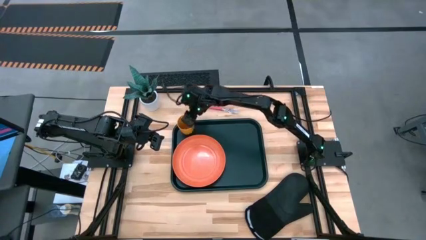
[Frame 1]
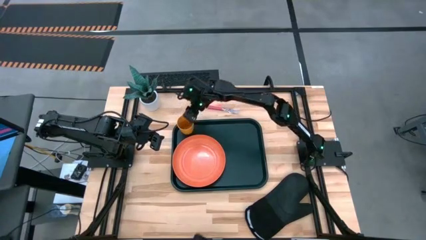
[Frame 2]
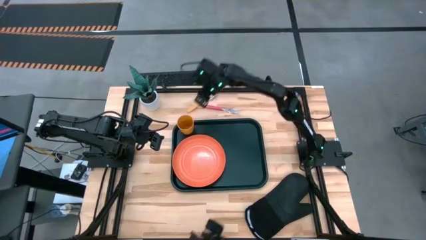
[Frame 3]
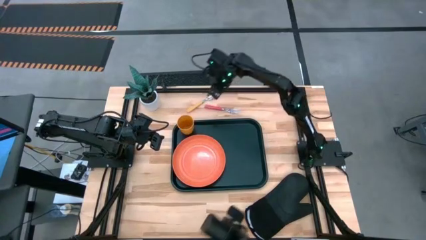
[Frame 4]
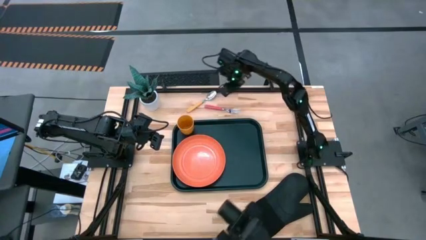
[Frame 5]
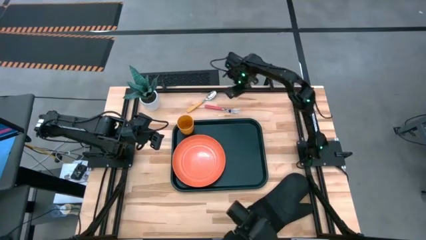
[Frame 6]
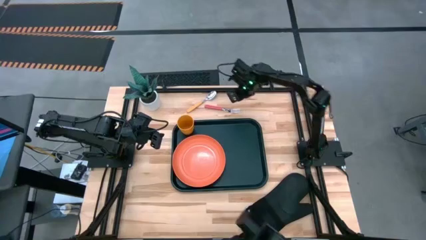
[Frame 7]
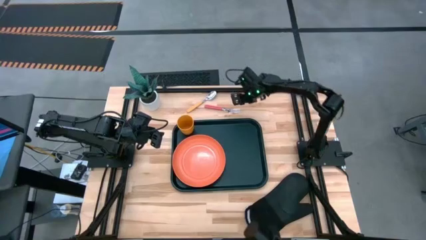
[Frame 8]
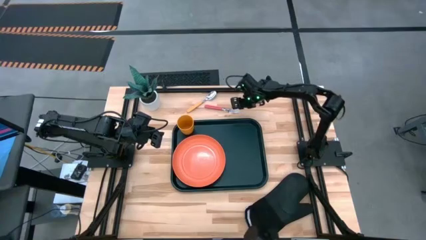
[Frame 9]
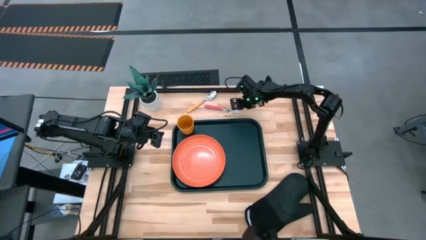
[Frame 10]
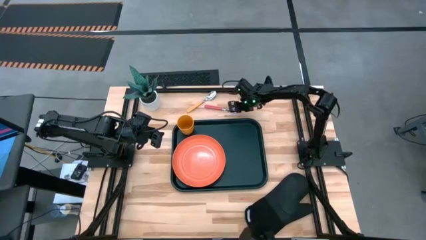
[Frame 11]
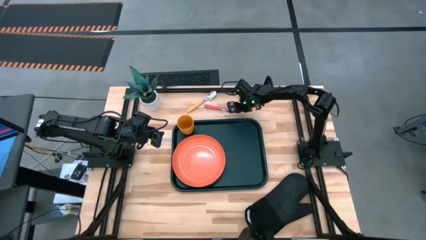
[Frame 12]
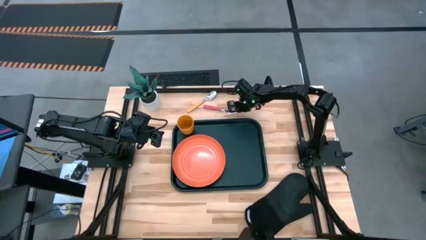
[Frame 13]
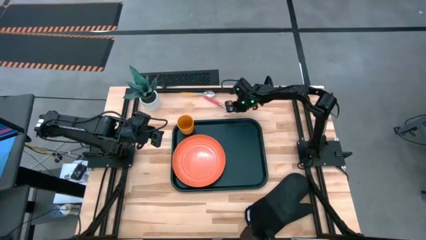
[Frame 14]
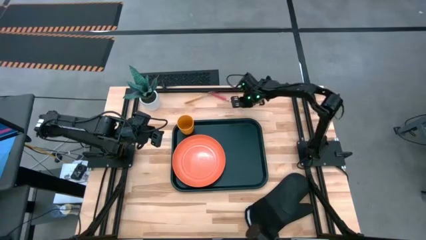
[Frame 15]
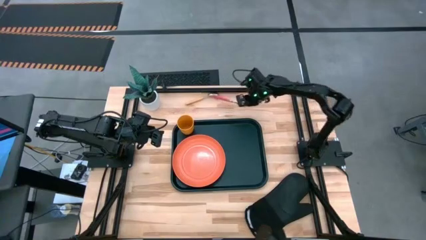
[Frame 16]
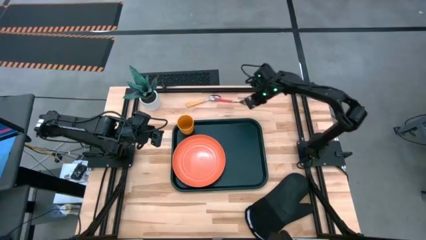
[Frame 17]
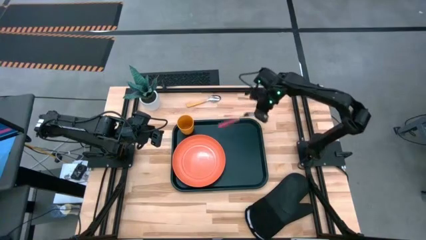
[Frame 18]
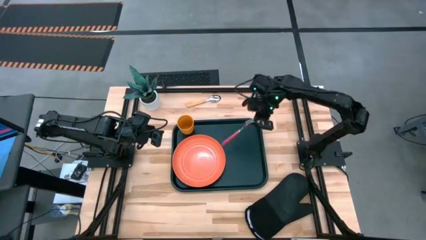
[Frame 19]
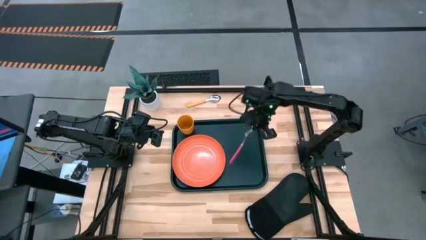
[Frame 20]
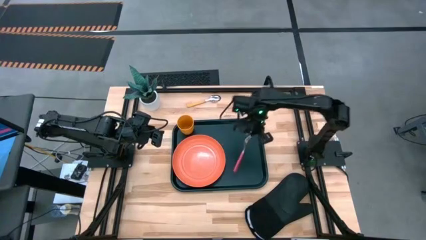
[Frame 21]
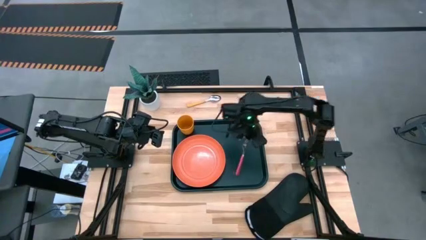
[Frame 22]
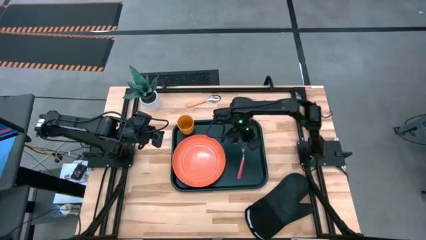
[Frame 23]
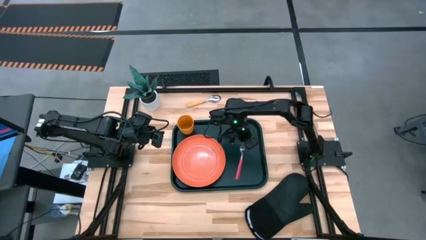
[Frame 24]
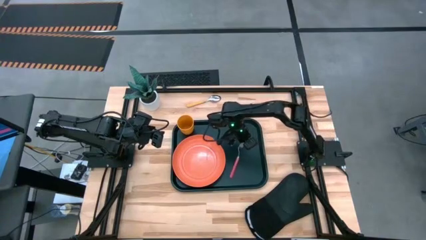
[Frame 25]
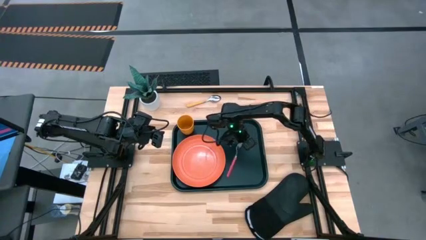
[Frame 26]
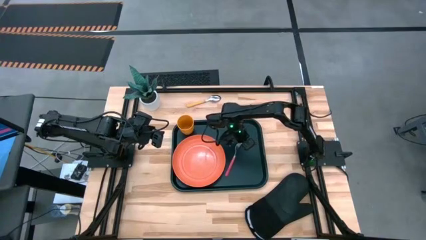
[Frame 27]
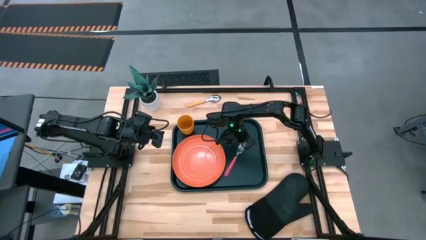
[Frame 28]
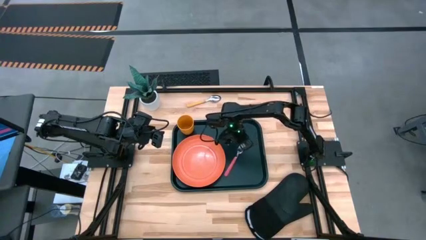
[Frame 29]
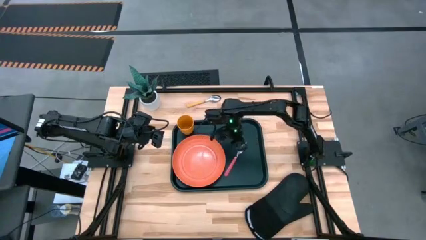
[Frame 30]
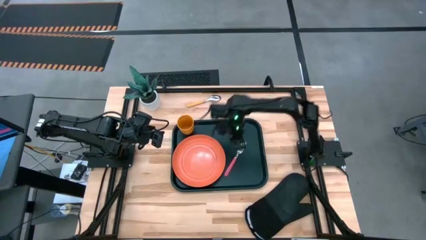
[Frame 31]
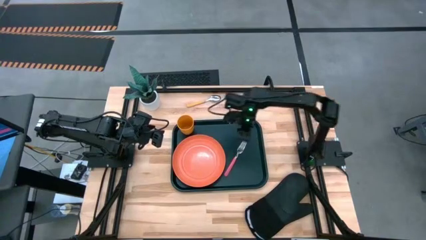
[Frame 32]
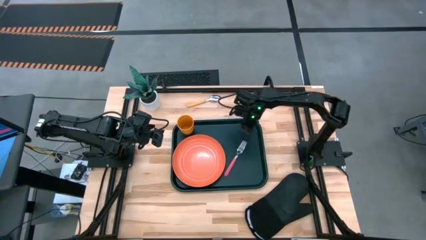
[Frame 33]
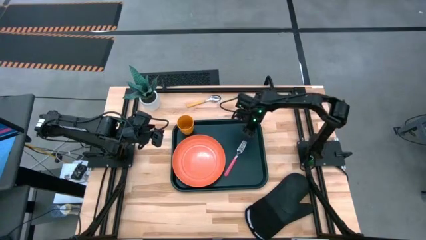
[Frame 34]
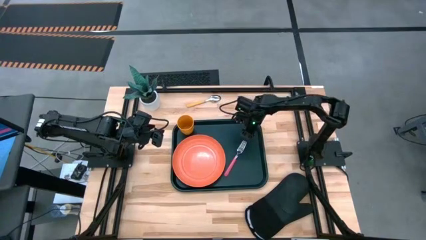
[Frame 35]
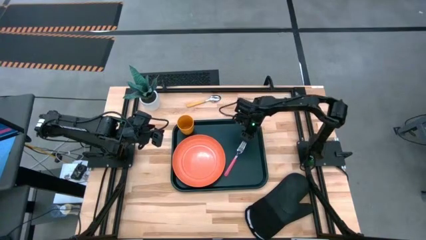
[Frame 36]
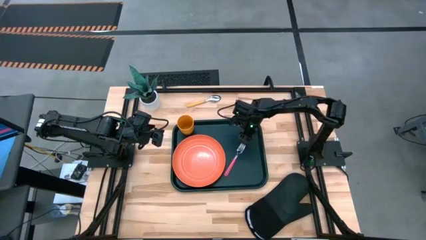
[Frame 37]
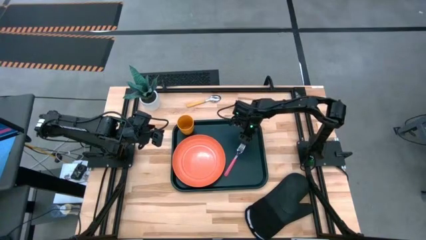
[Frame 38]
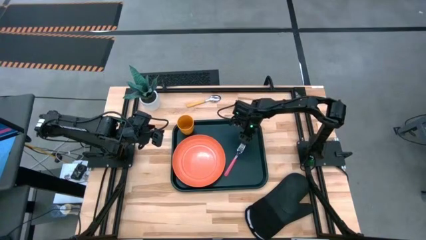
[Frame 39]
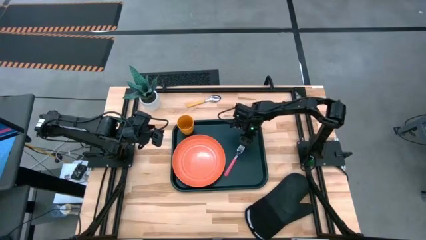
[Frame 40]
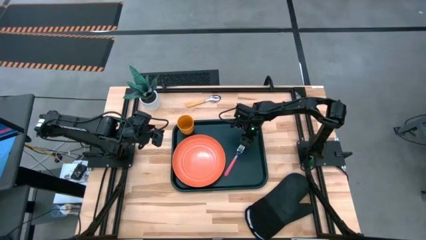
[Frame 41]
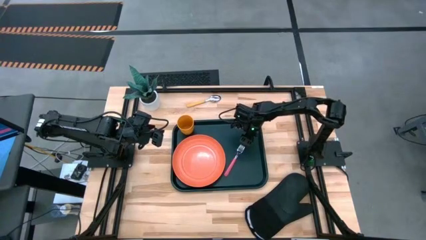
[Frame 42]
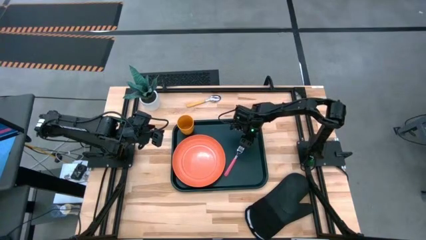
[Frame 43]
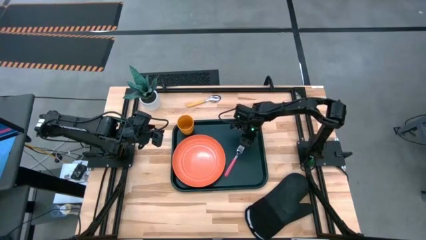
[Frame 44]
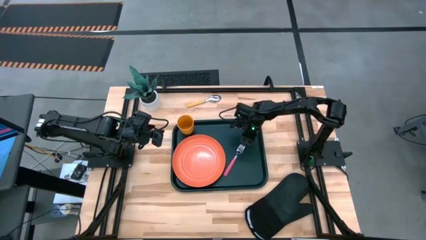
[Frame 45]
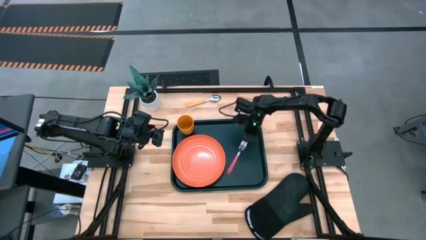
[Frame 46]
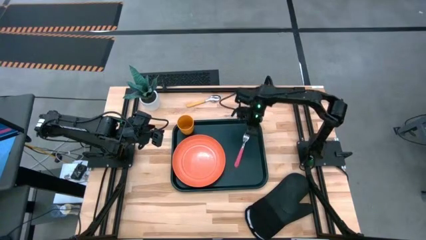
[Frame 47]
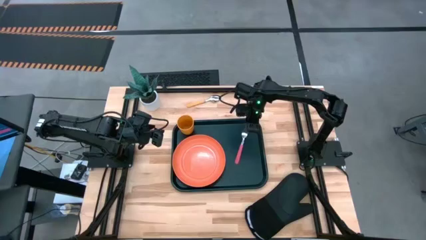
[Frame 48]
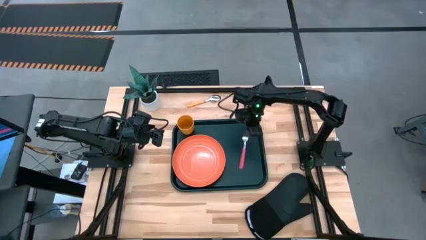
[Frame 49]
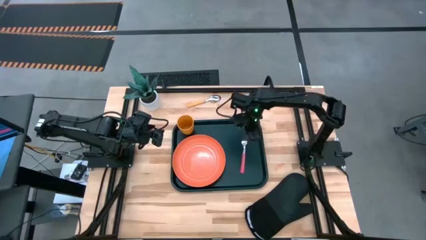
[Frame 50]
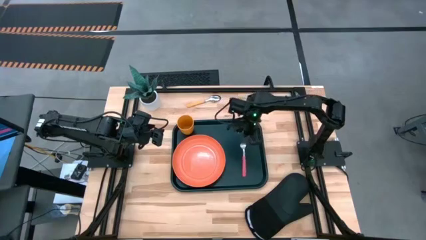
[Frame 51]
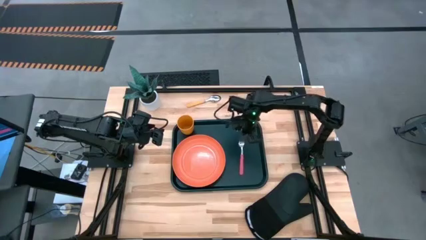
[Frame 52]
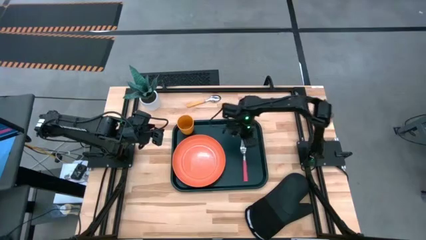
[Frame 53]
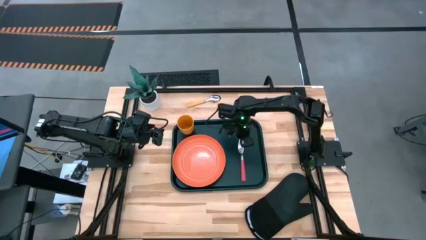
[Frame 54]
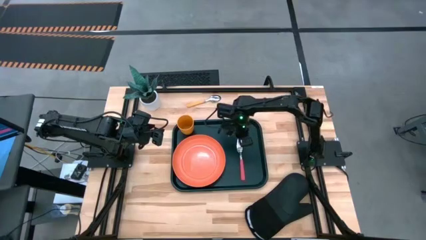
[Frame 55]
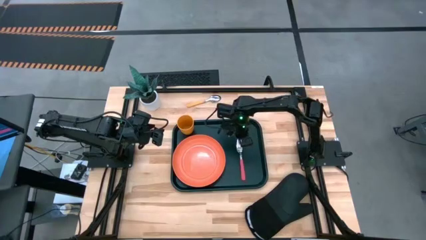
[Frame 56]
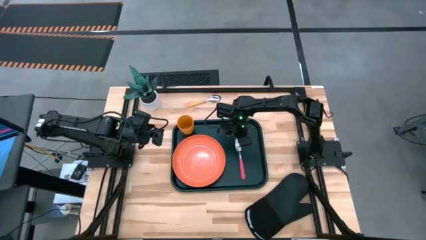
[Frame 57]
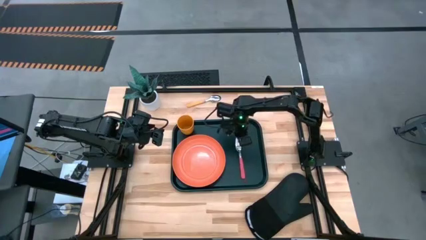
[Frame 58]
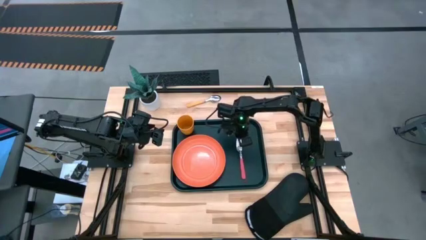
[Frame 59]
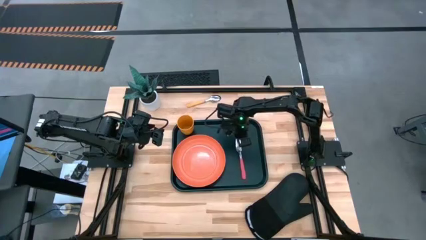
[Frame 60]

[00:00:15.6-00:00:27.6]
Task: Pick and place plate/cup/fork/spoon on tray
Put the pink fork on the black tray to the right of the orange plate

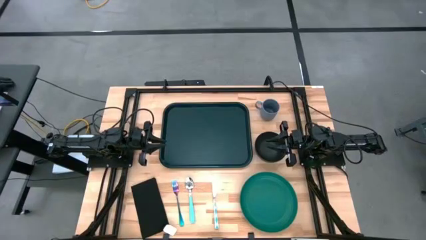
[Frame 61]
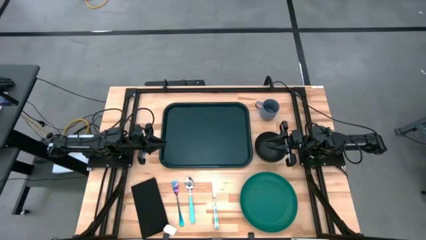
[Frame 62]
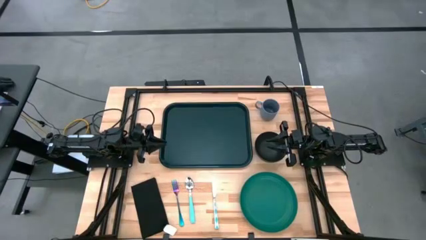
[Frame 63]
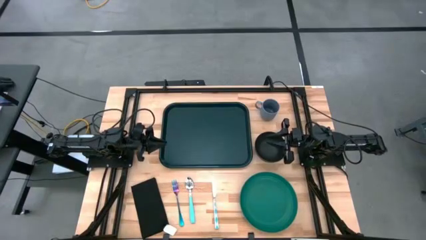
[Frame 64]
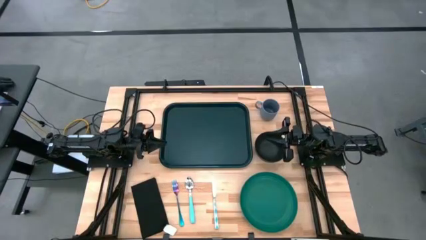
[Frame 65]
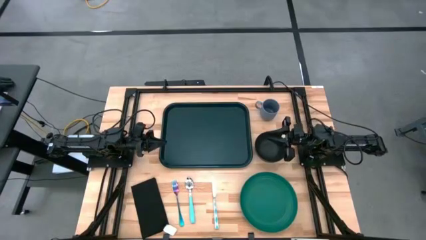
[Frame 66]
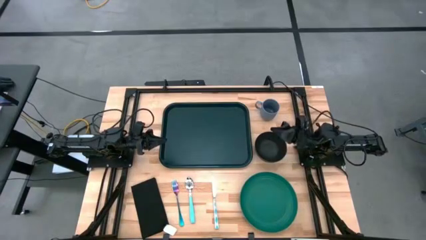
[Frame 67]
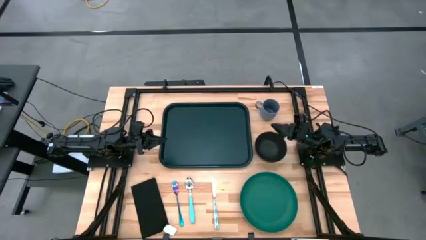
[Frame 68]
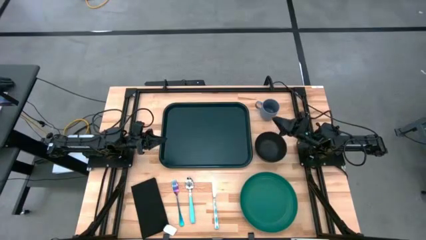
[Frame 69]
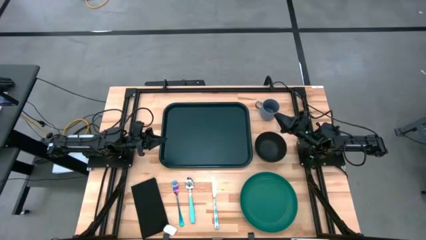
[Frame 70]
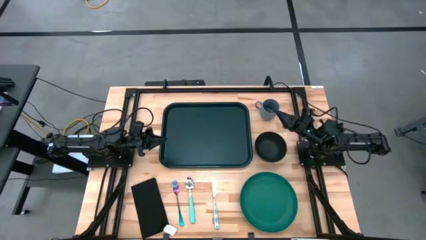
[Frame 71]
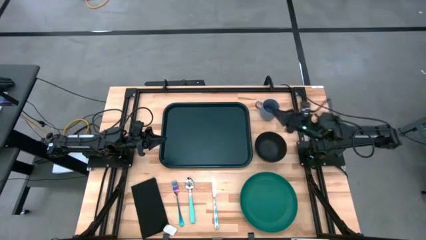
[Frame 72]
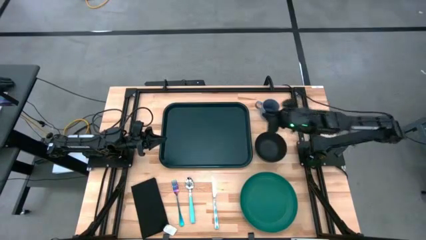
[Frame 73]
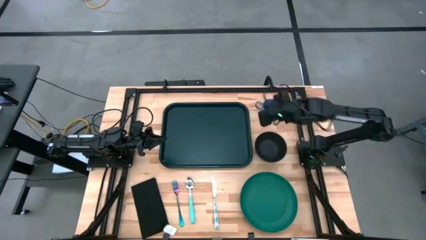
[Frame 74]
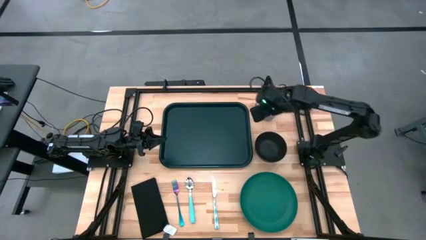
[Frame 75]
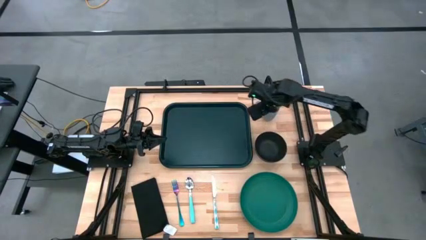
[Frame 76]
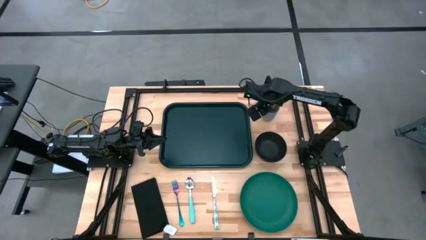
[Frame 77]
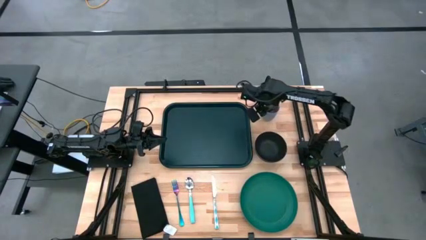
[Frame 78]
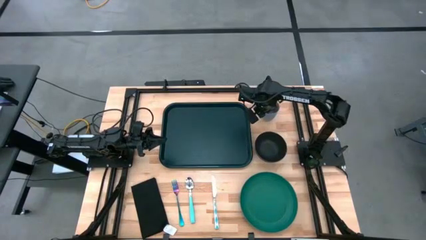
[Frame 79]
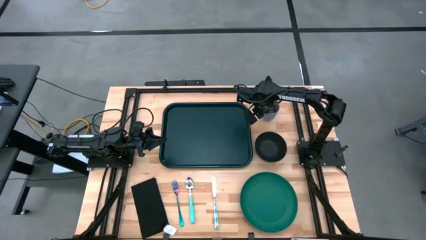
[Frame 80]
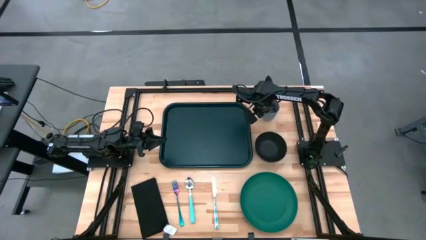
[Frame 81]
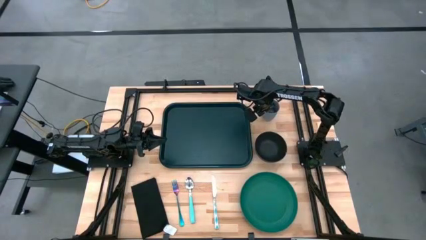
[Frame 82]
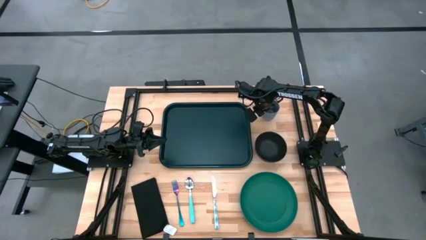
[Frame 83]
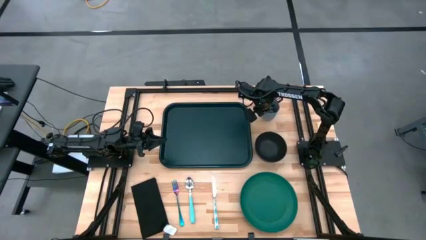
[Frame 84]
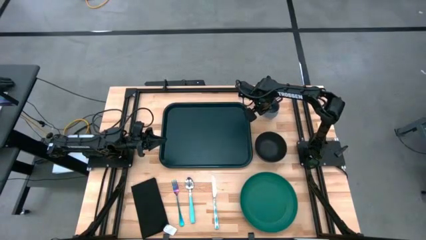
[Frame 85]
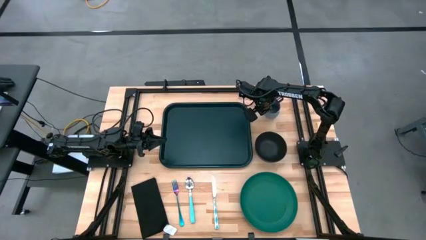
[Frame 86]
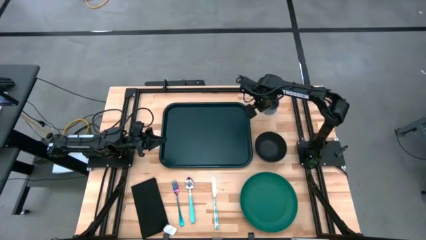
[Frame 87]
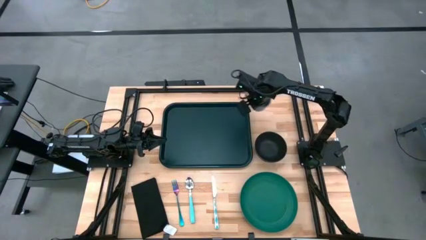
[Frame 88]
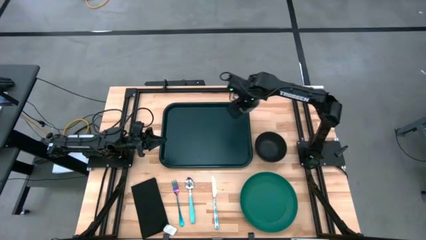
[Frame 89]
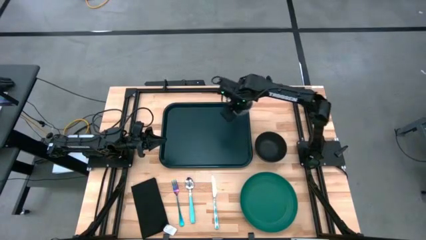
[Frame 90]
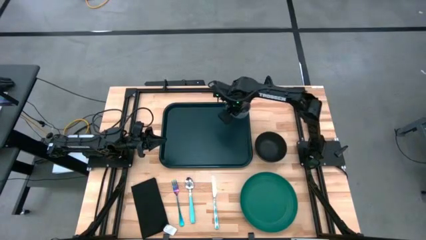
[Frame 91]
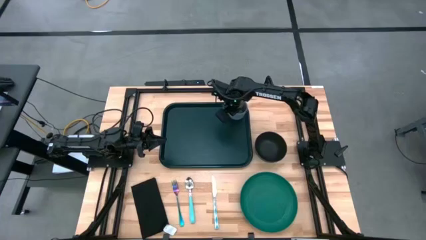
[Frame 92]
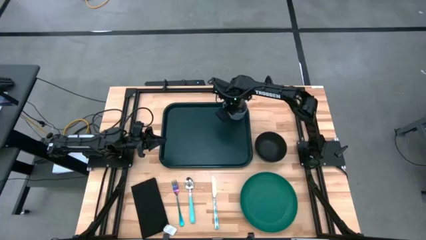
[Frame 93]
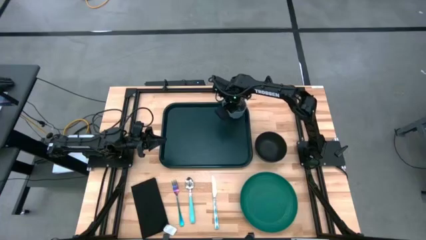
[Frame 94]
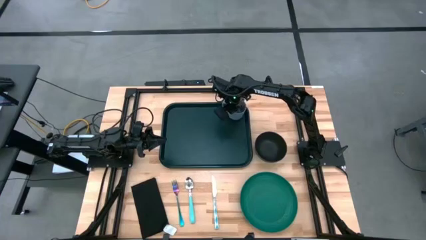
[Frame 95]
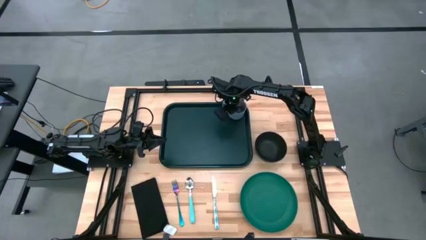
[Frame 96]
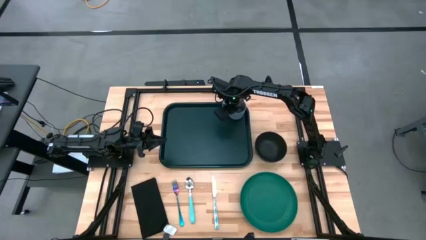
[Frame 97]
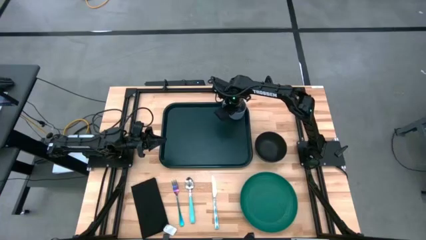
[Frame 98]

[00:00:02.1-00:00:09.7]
Task: Set up tray
Put the gray mug on the top right of the black tray
